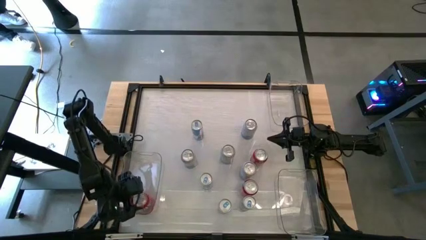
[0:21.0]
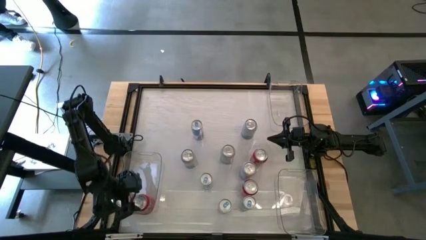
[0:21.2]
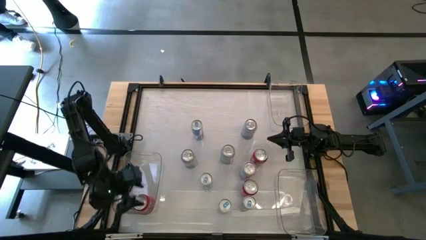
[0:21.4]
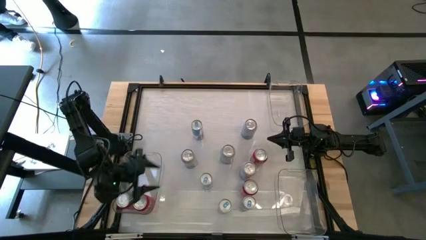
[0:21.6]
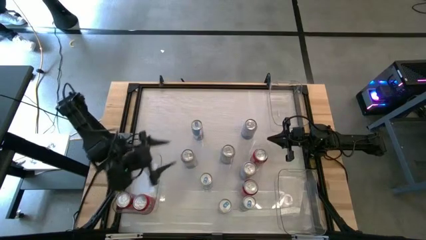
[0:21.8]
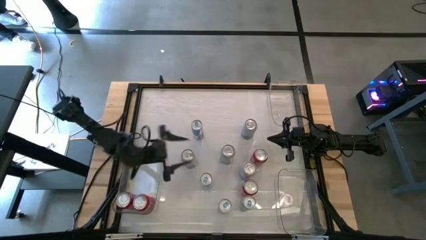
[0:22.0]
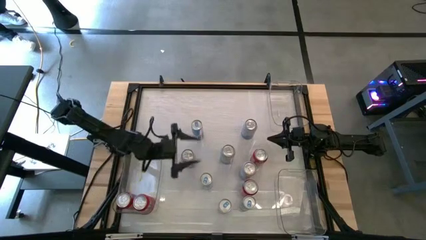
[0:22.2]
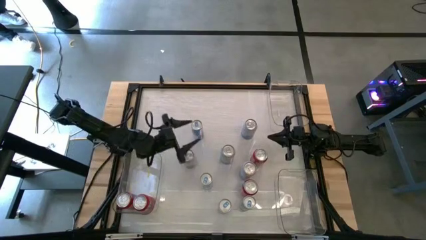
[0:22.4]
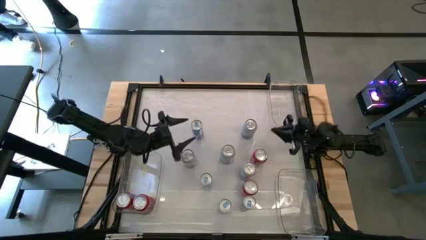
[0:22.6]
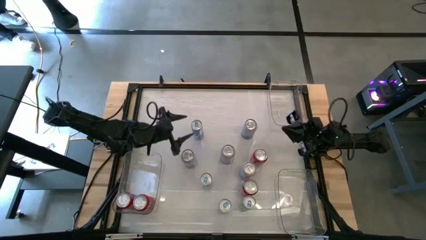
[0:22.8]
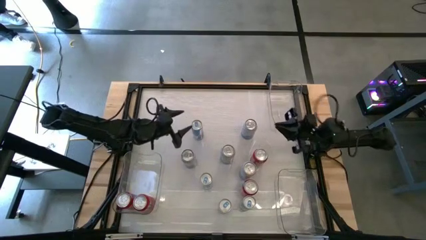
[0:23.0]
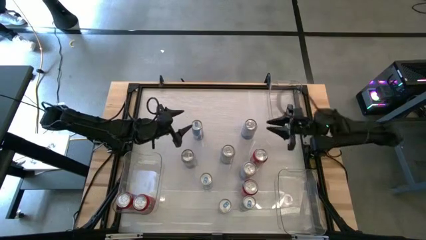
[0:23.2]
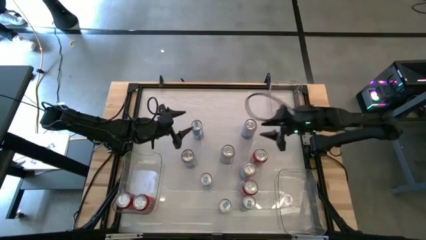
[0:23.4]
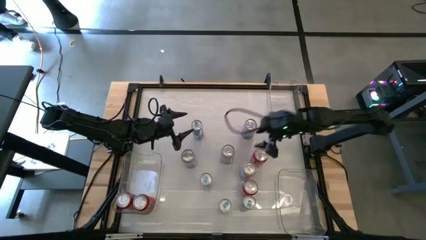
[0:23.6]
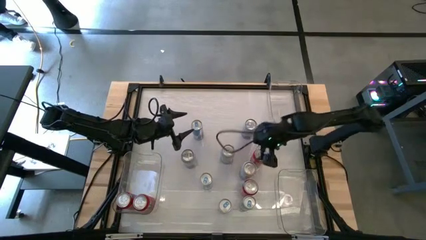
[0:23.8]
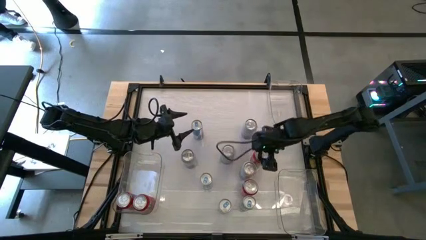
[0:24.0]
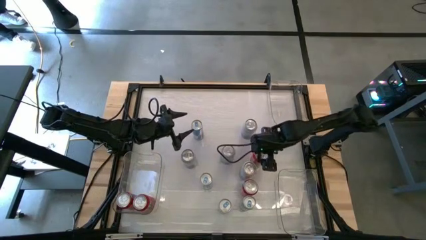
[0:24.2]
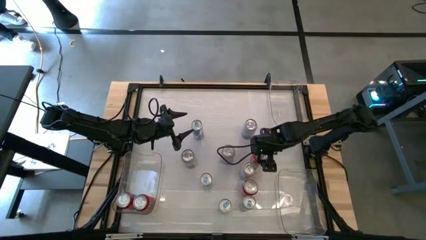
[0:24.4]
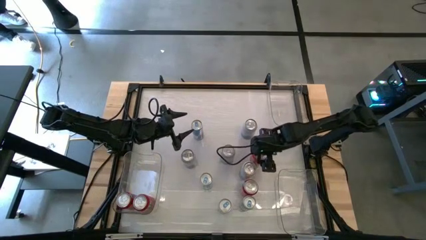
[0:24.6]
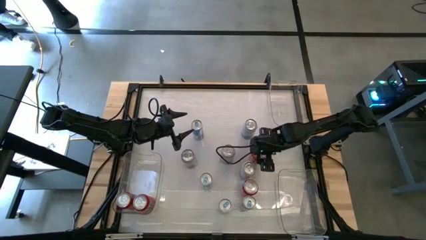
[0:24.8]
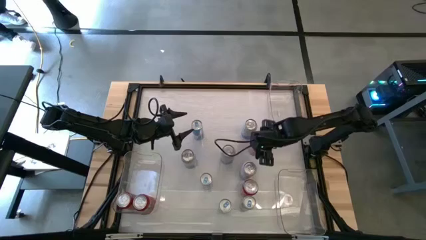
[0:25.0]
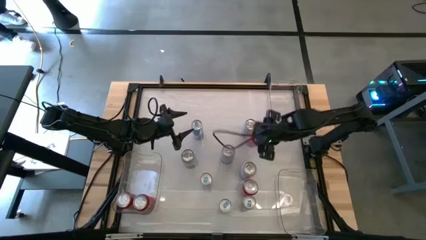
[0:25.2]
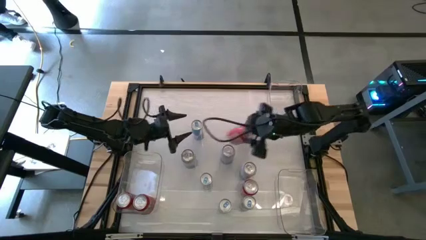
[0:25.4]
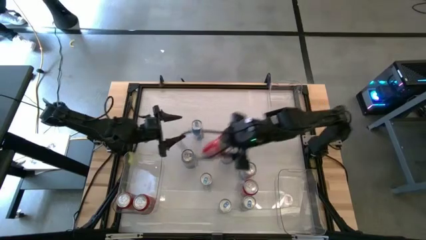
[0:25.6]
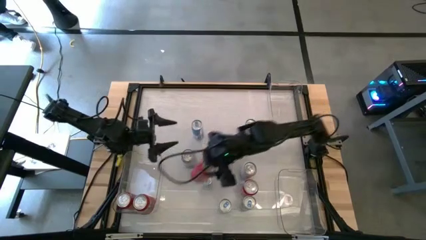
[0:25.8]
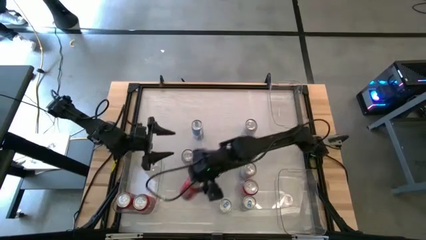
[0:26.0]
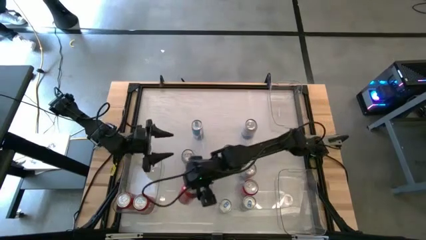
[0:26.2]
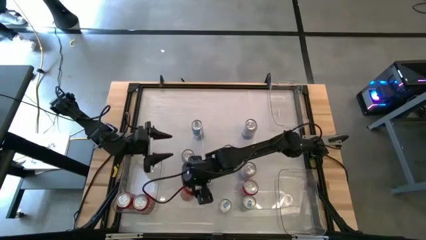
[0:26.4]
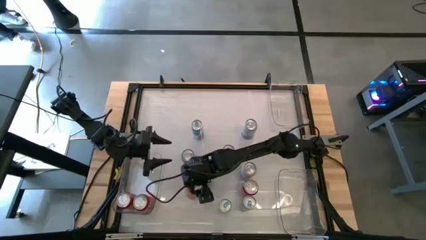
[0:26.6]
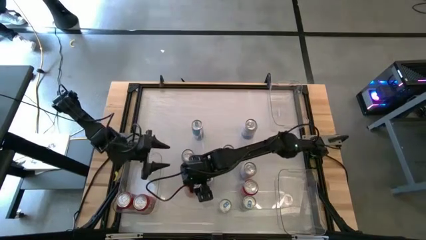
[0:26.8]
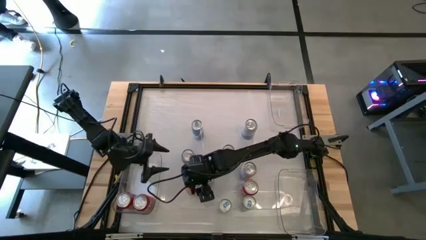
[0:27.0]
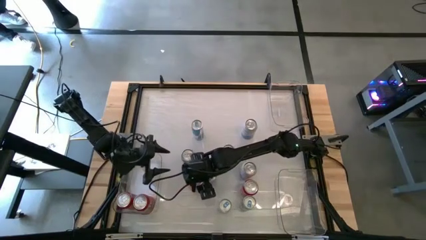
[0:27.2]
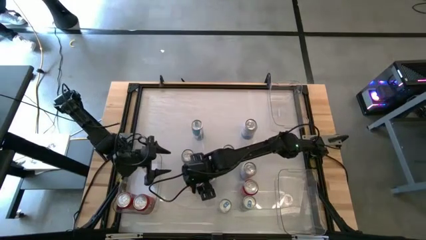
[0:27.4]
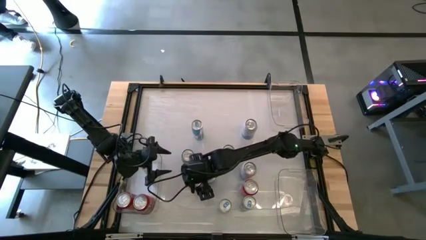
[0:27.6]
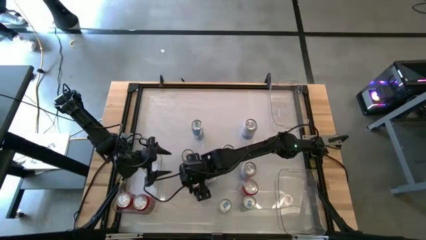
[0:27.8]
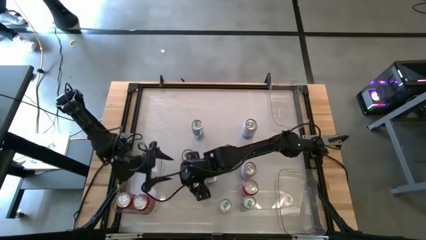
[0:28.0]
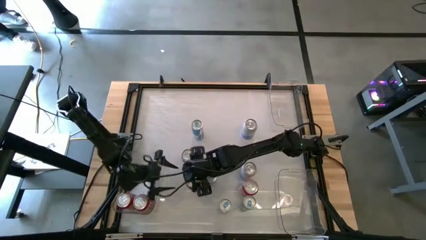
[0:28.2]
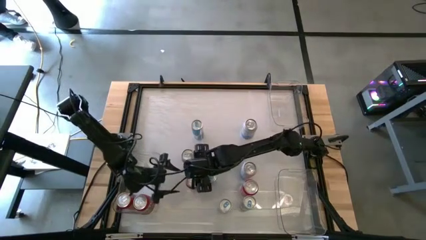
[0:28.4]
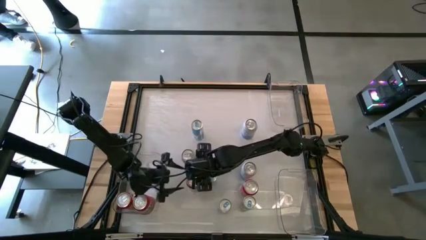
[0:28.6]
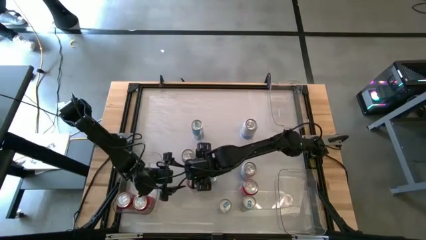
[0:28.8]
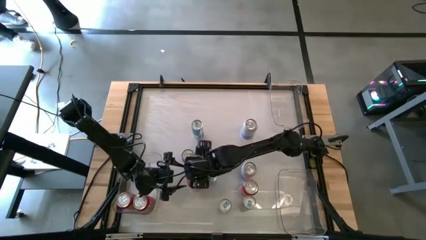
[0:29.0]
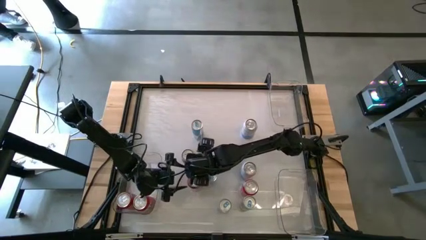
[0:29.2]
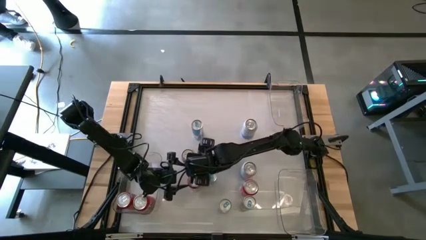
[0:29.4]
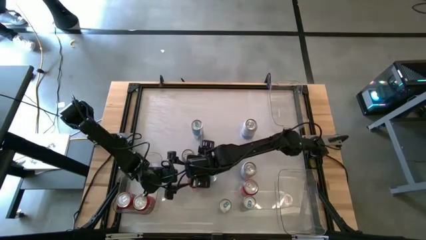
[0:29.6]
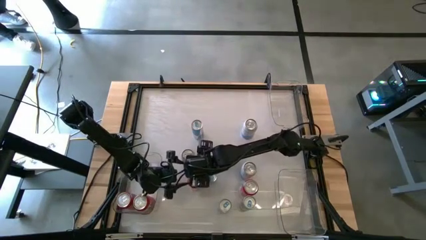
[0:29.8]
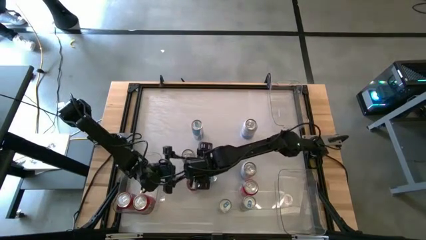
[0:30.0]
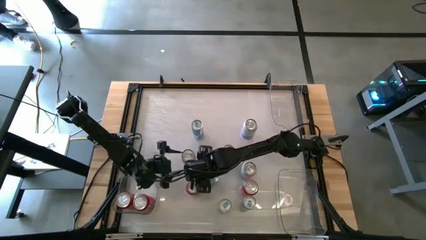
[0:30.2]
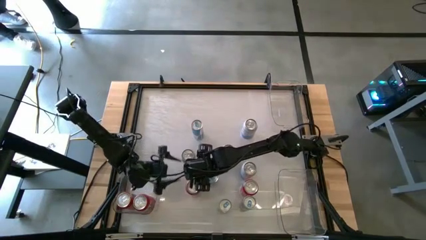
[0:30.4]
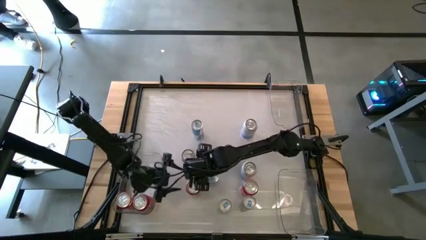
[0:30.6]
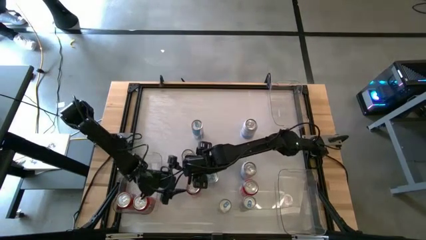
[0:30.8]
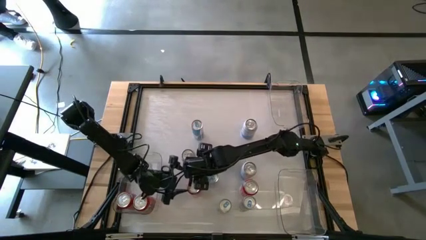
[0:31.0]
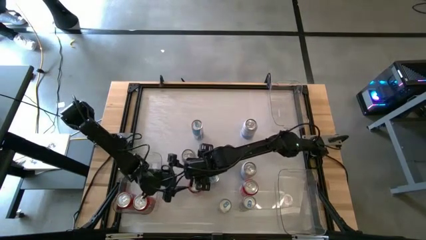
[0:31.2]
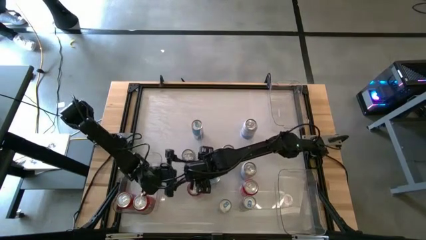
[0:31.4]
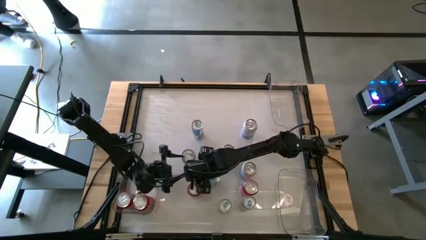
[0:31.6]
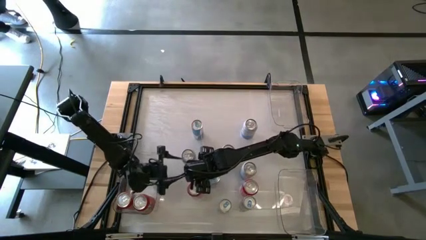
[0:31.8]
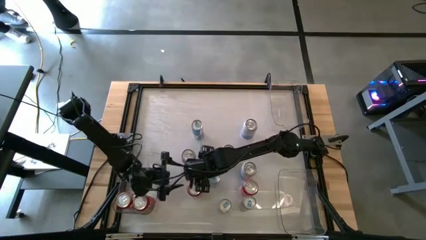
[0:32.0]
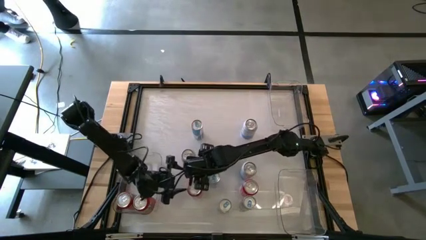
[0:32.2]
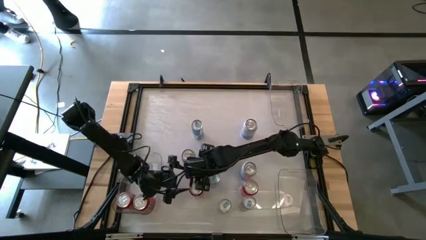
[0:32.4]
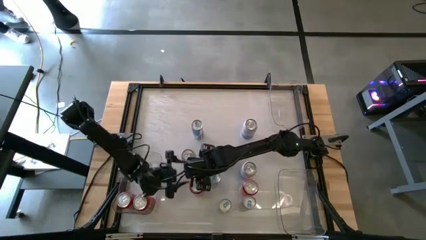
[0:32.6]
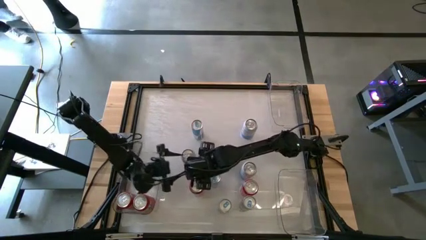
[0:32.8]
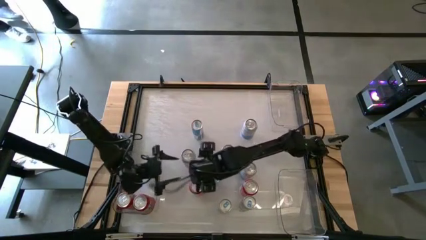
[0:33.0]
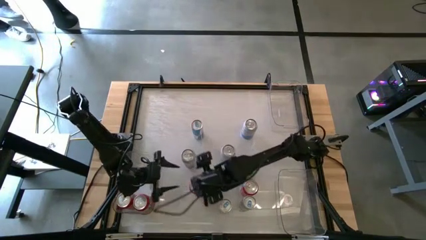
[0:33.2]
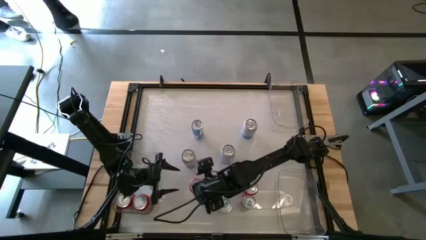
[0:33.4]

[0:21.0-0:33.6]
Task: Sort soda cans
Put the middle right red soda can into the left transparent bin
